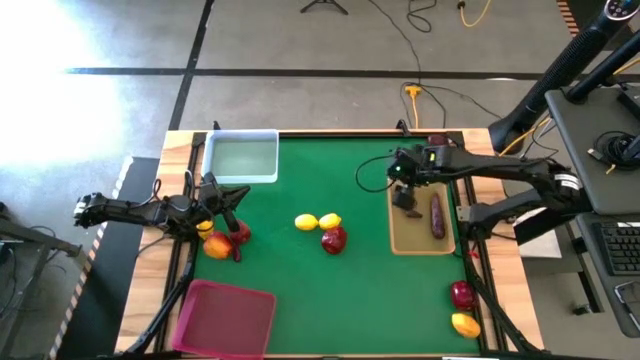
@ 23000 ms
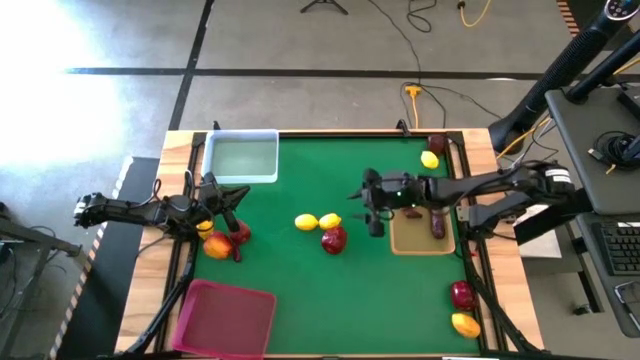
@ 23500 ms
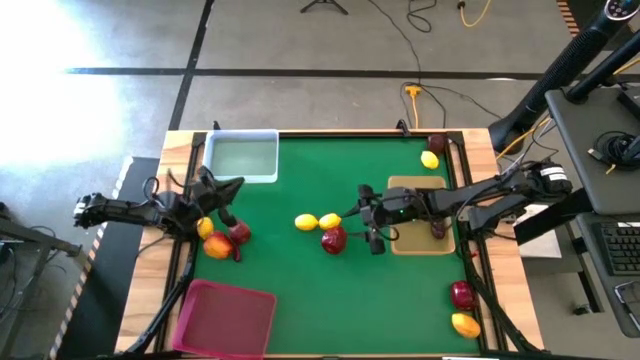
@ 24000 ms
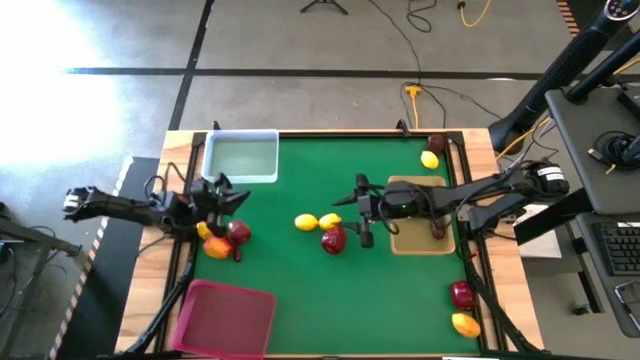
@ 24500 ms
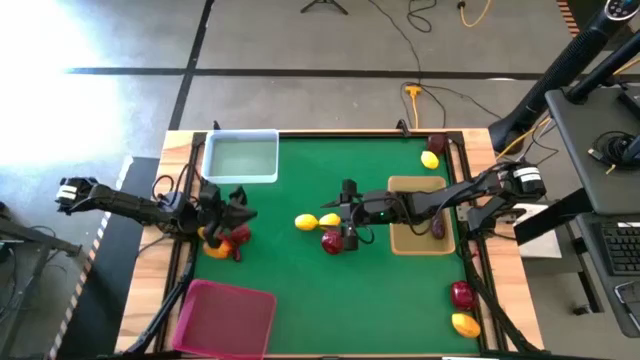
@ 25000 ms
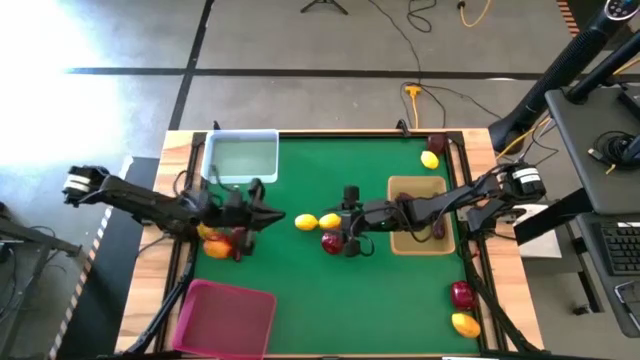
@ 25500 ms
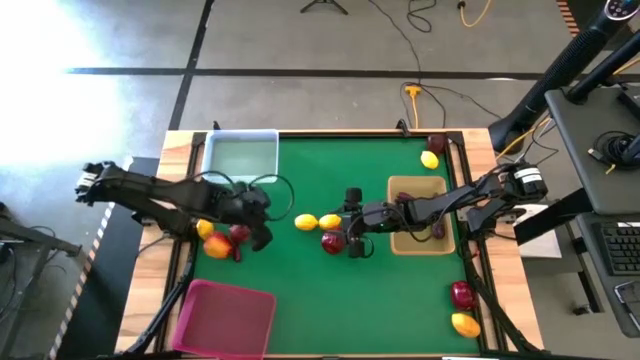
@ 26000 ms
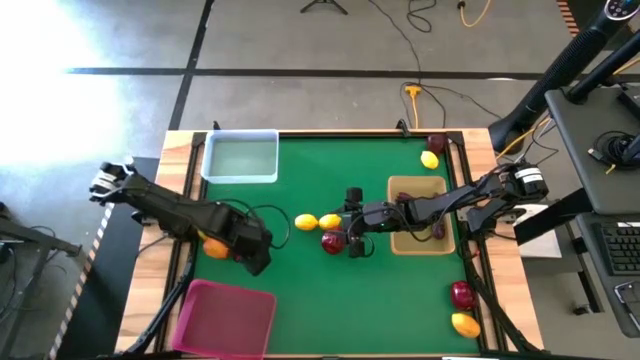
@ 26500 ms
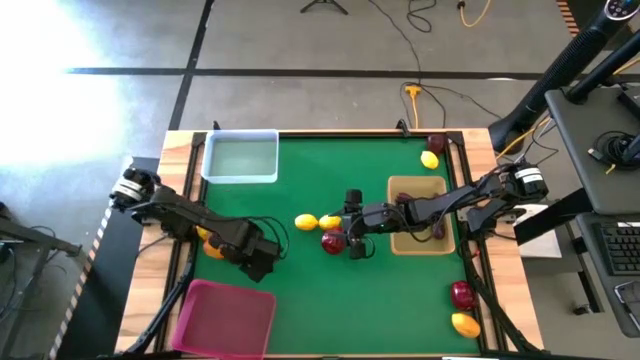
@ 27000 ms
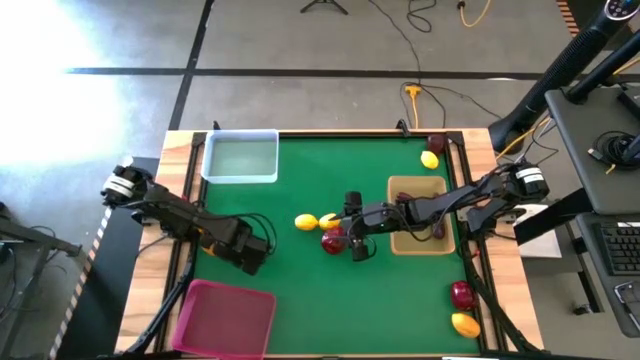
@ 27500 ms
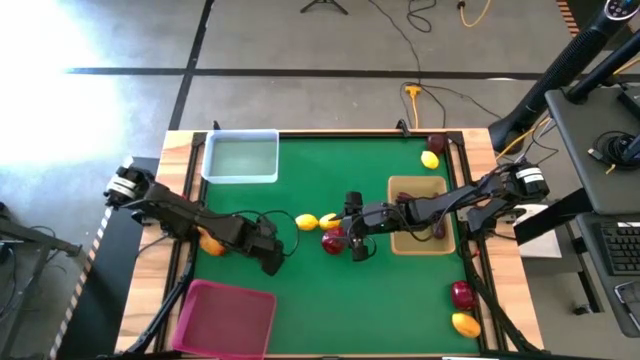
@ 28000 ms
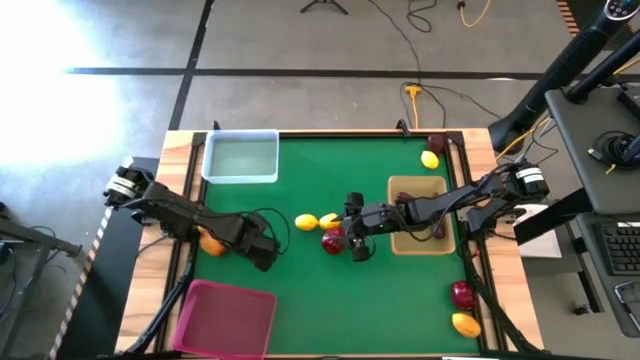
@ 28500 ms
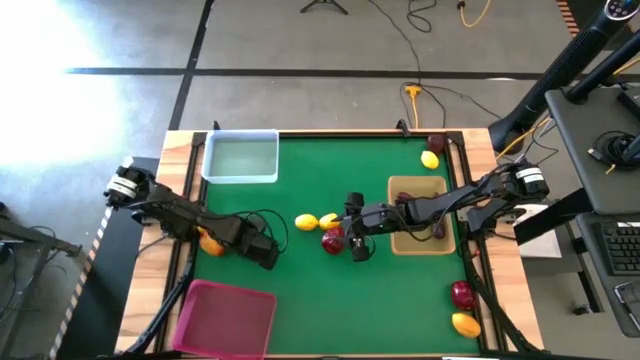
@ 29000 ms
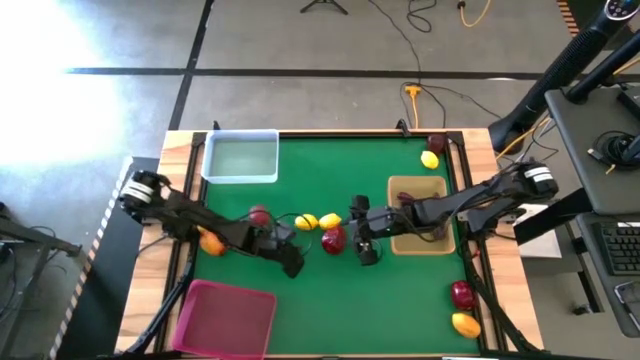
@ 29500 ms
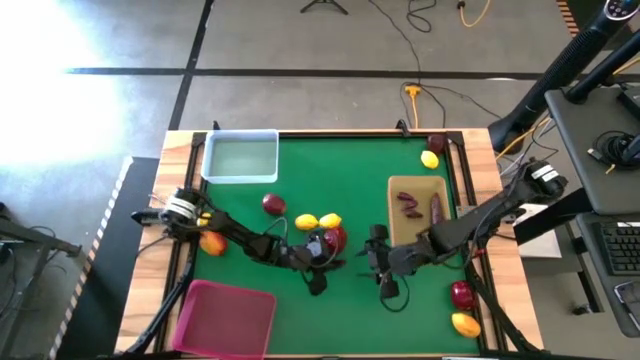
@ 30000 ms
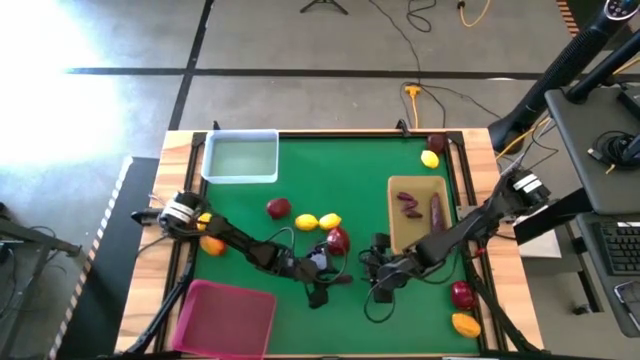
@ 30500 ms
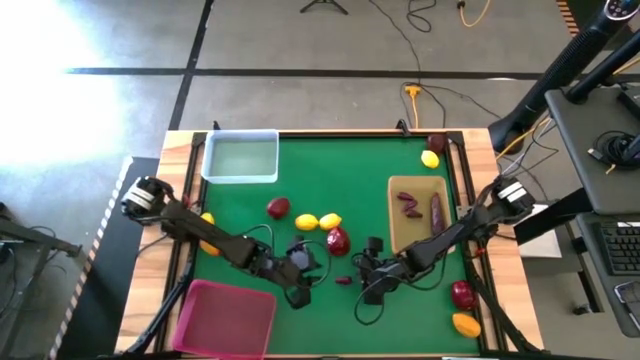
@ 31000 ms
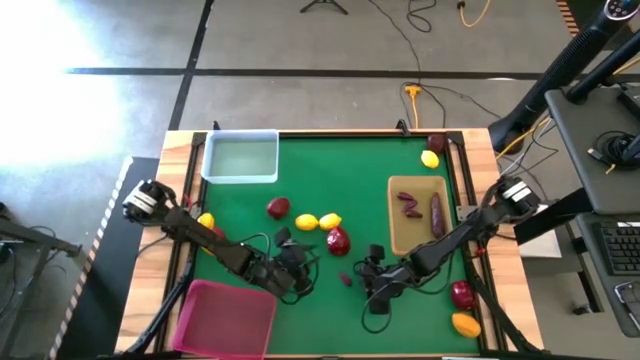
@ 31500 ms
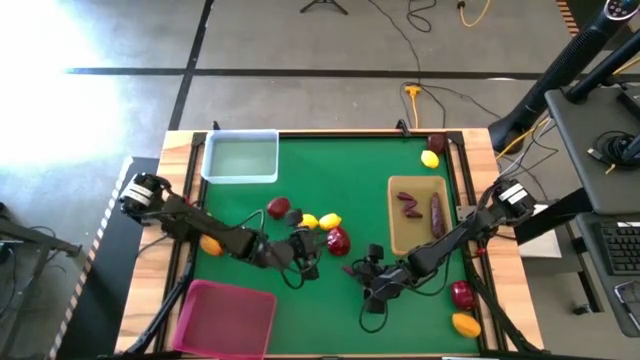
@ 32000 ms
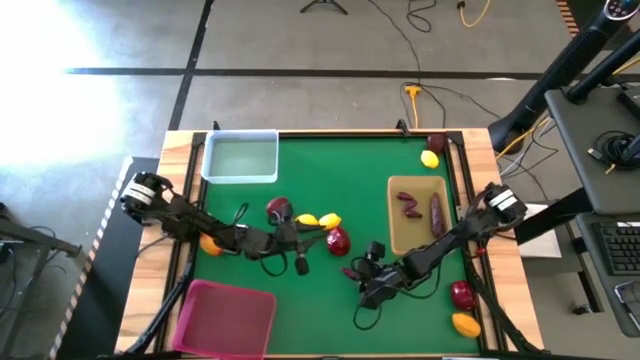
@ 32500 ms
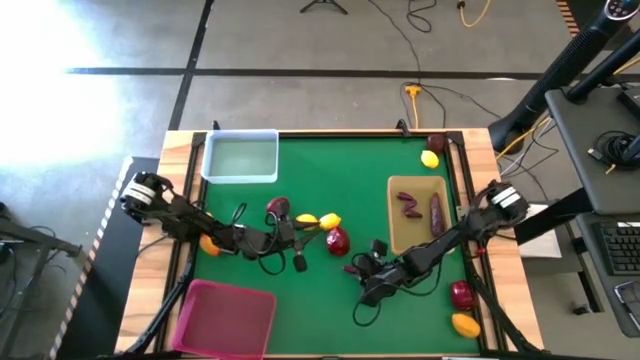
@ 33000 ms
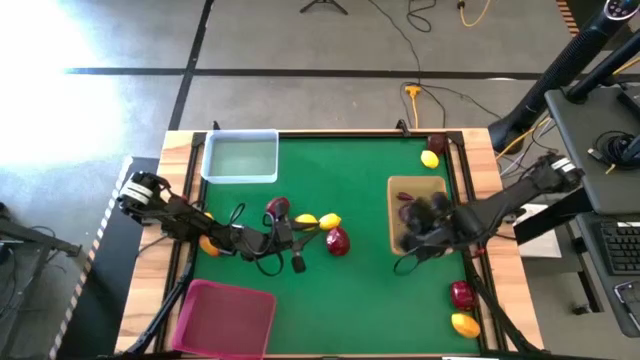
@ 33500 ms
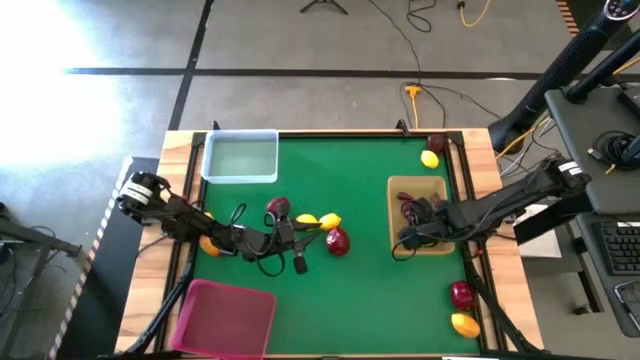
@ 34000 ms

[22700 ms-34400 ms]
Task: Sort produce into baskets
Put the small eggplant into the orange transparent bin

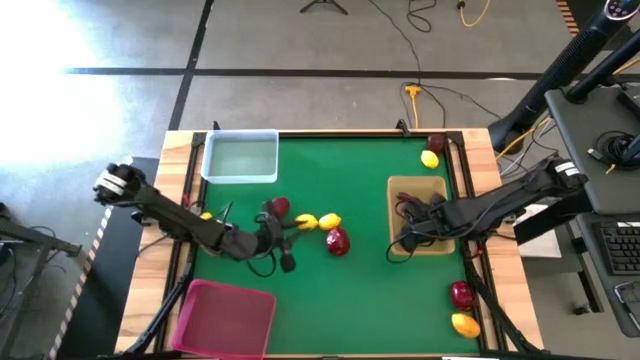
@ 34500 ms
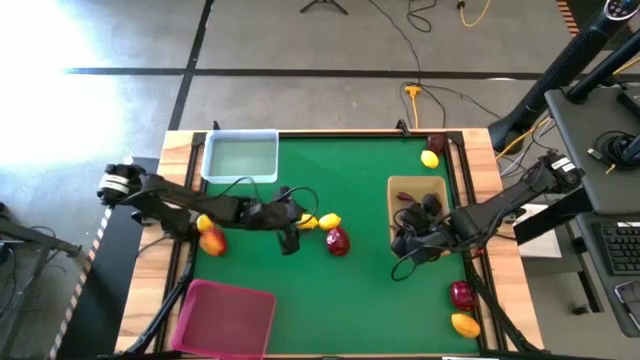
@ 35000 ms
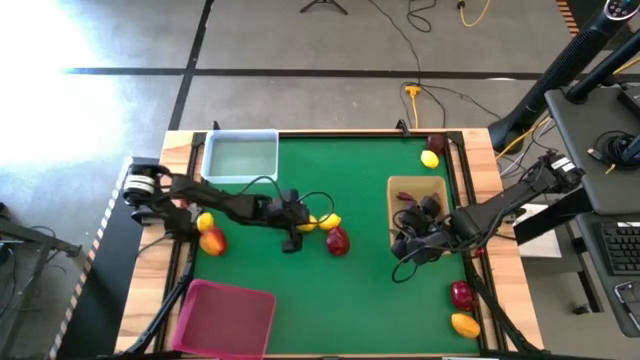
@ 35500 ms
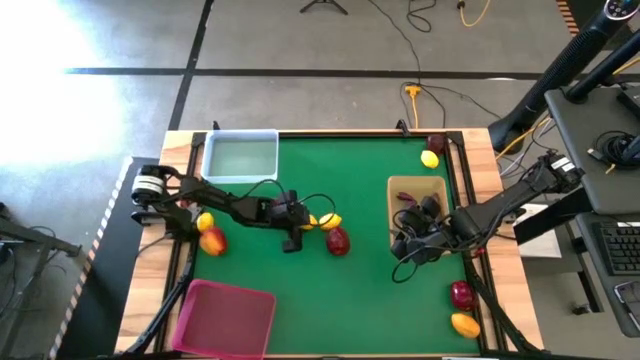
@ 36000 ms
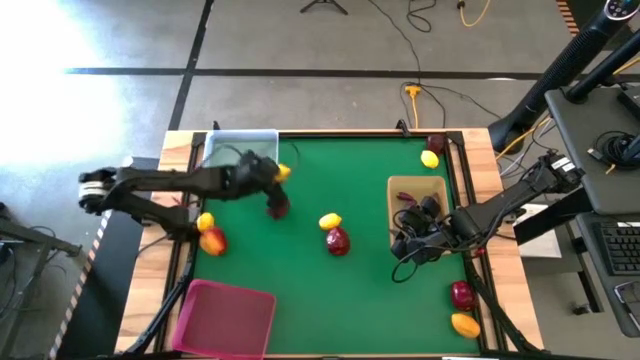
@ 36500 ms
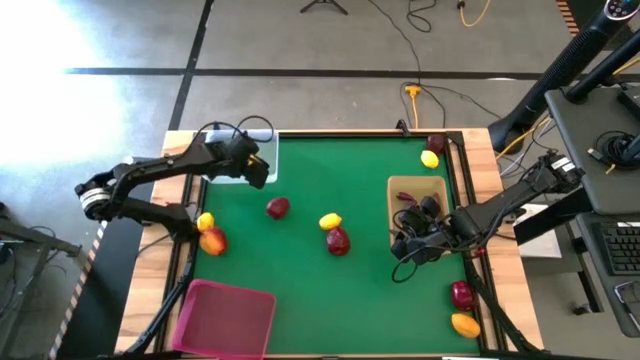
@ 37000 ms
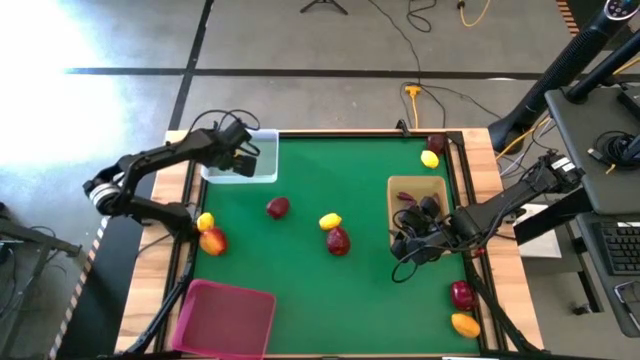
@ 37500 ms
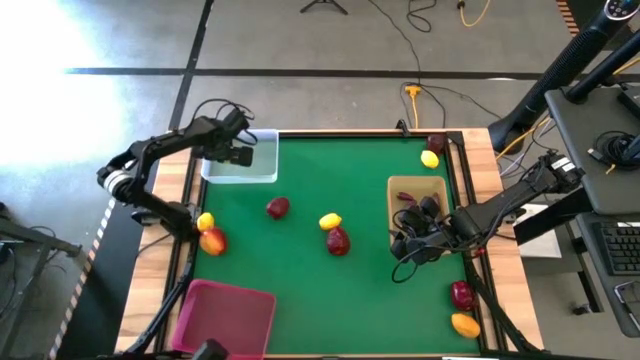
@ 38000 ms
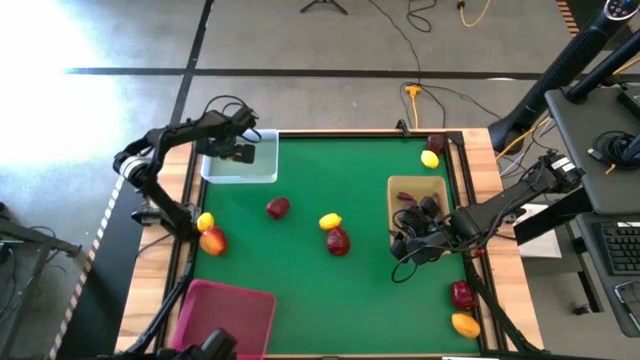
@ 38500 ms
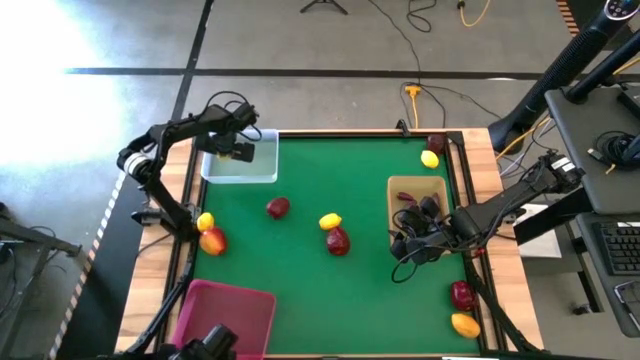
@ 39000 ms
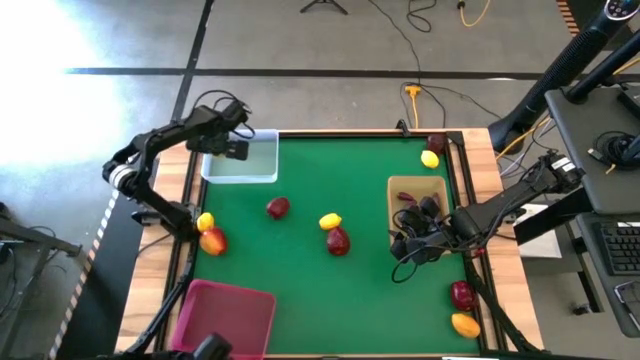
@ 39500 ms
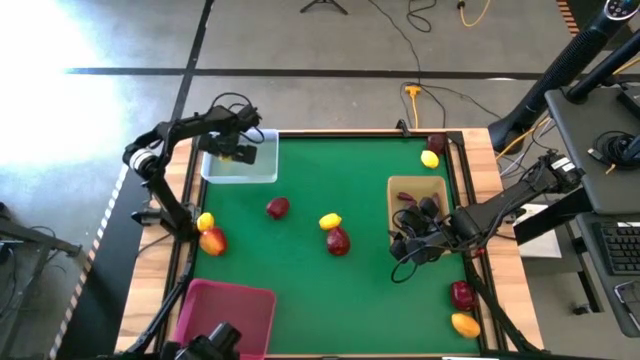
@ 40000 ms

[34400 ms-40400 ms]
Put the lemon into the transparent bin

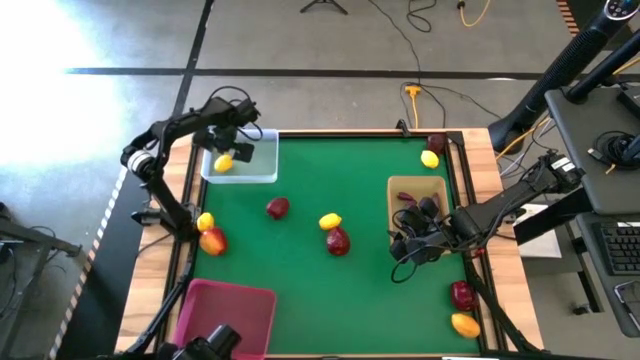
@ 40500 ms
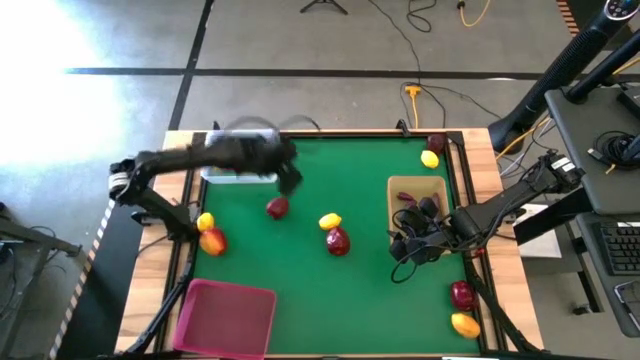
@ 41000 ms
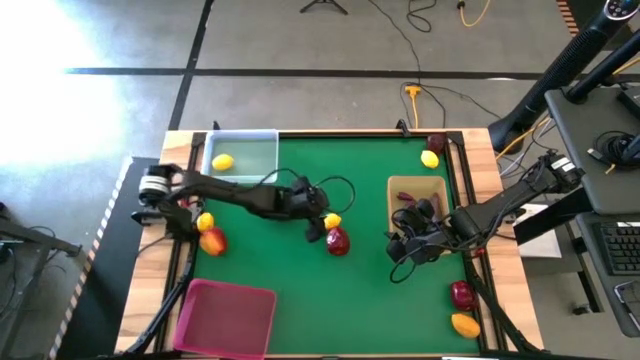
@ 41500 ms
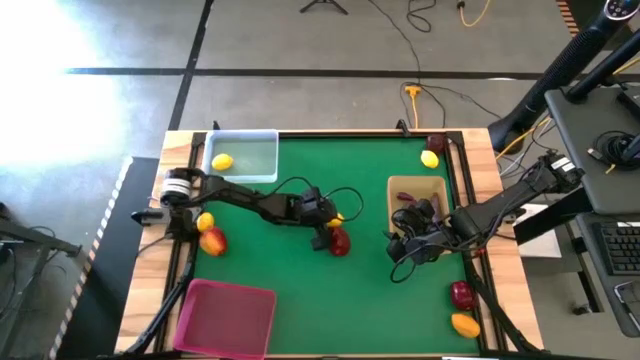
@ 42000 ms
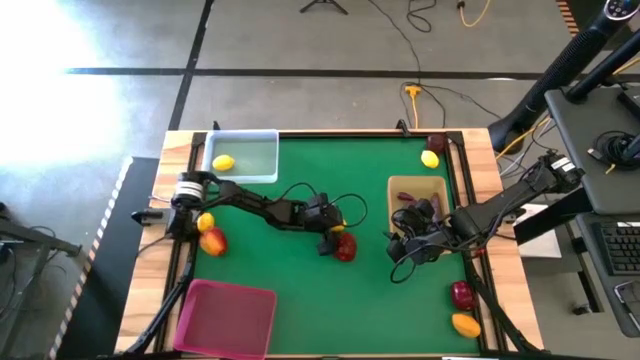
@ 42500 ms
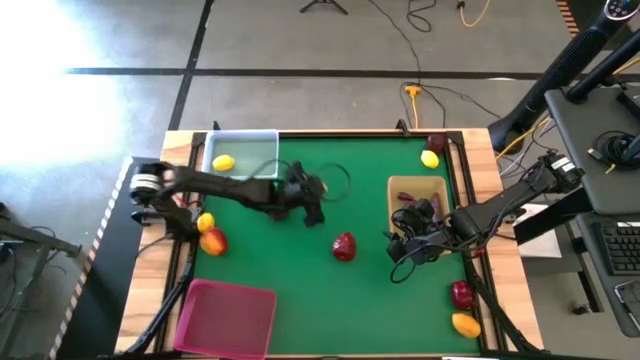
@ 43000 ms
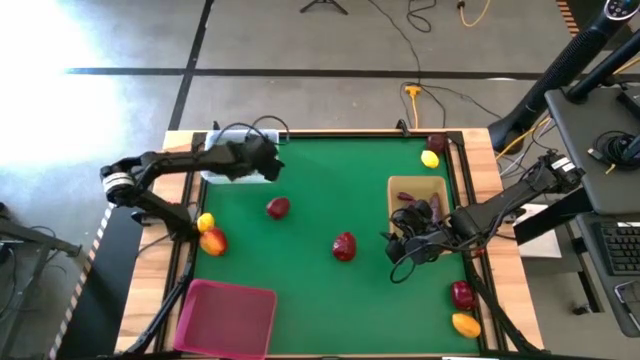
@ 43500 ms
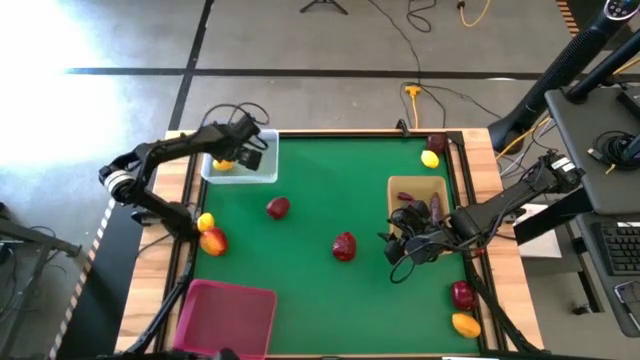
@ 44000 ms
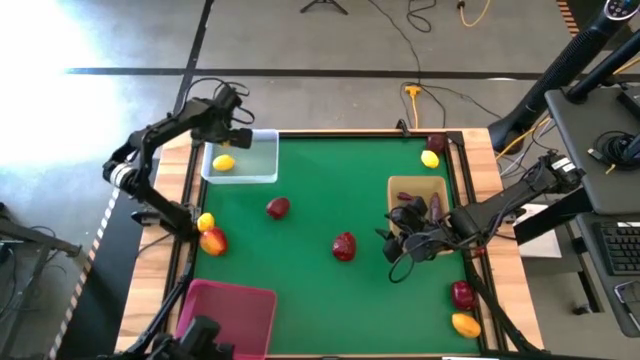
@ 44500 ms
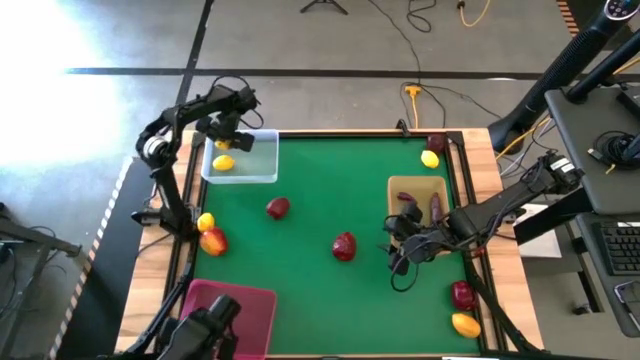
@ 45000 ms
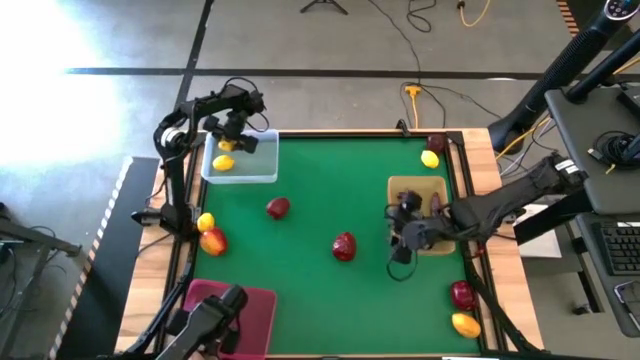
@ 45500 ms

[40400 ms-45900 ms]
Put the lemon into the transparent bin
